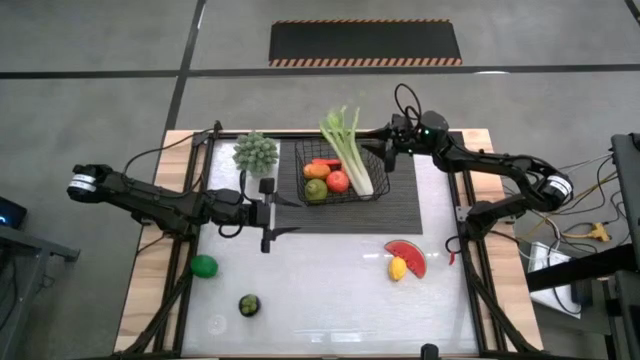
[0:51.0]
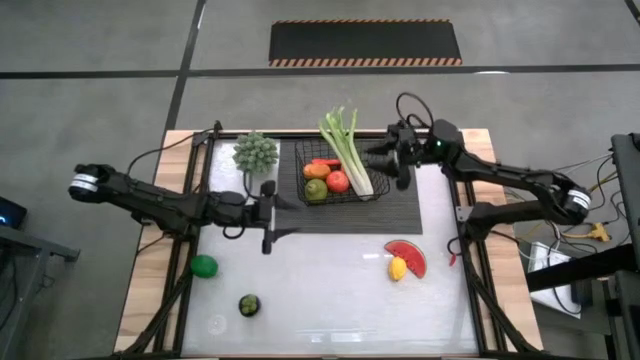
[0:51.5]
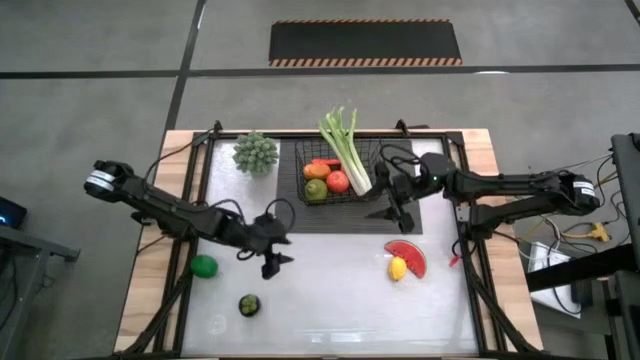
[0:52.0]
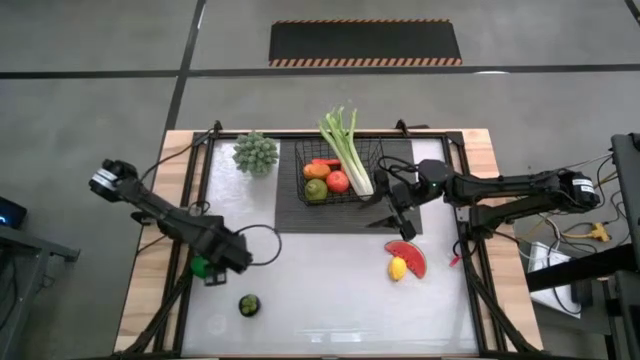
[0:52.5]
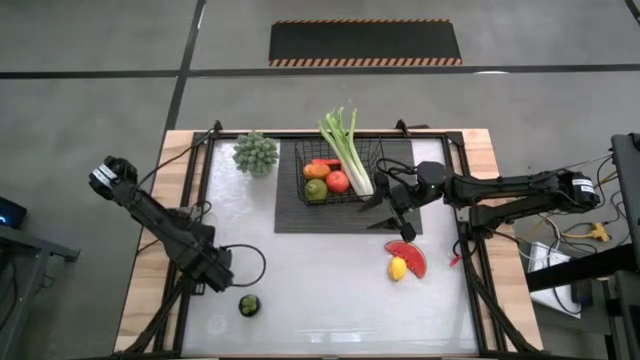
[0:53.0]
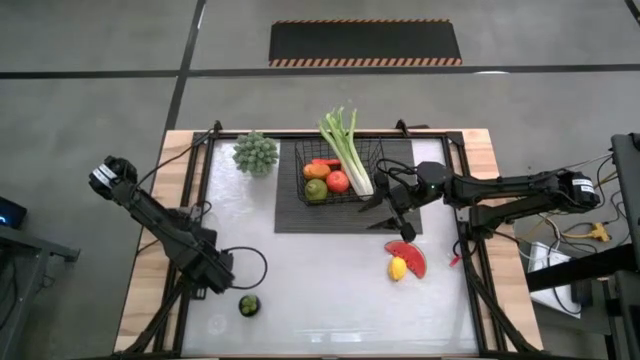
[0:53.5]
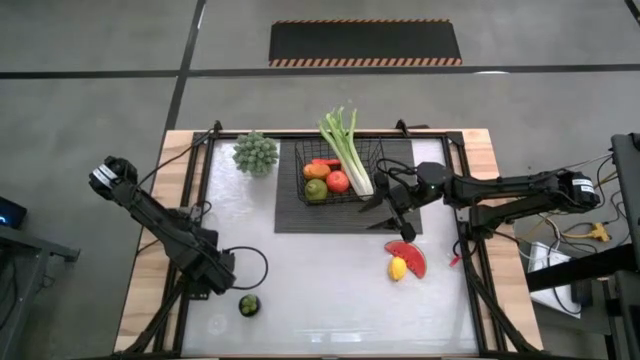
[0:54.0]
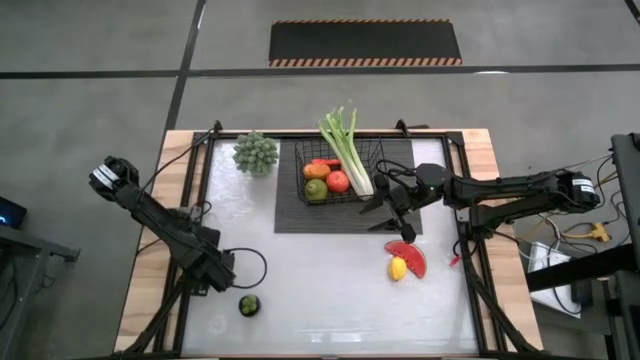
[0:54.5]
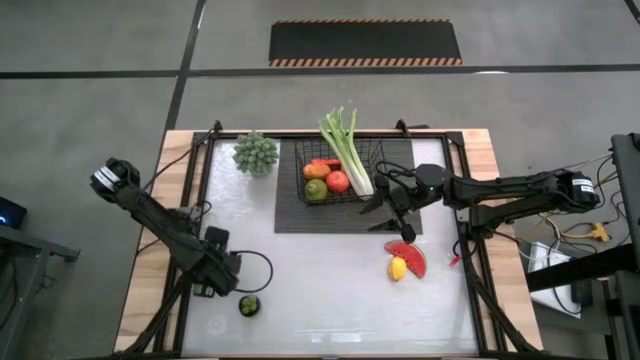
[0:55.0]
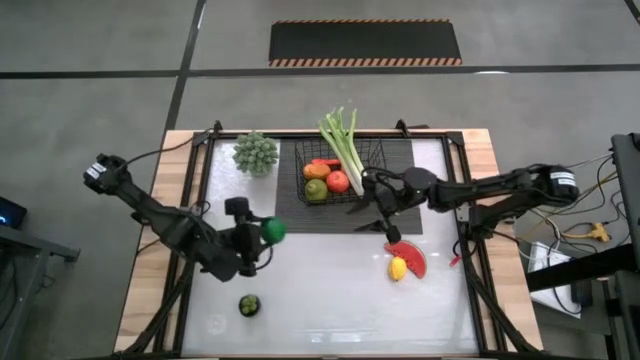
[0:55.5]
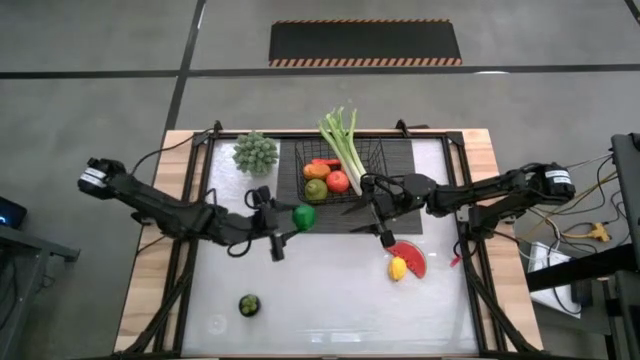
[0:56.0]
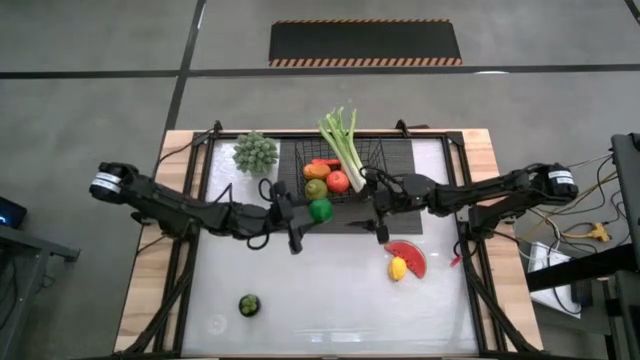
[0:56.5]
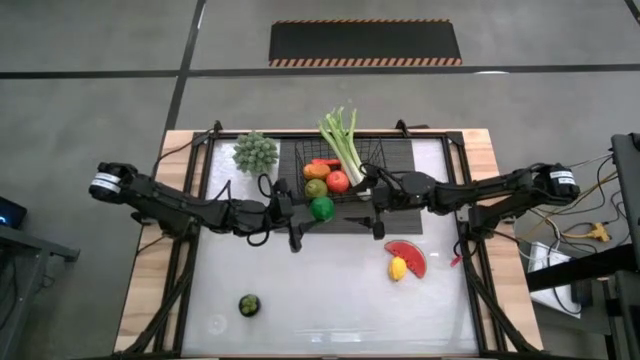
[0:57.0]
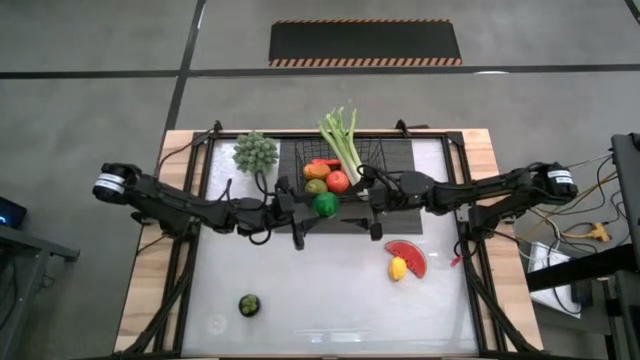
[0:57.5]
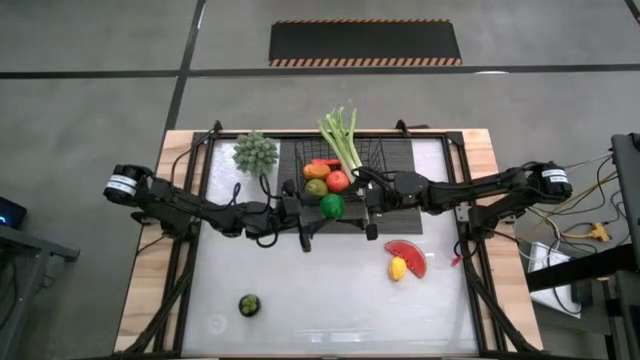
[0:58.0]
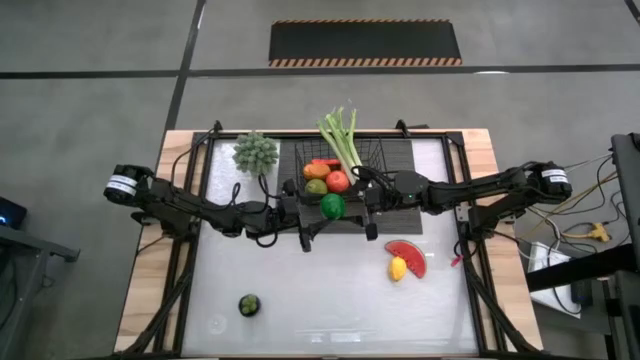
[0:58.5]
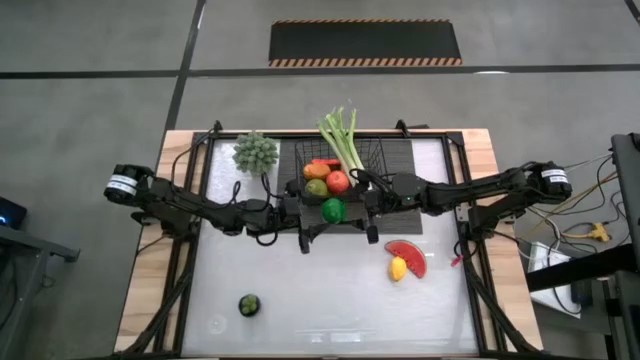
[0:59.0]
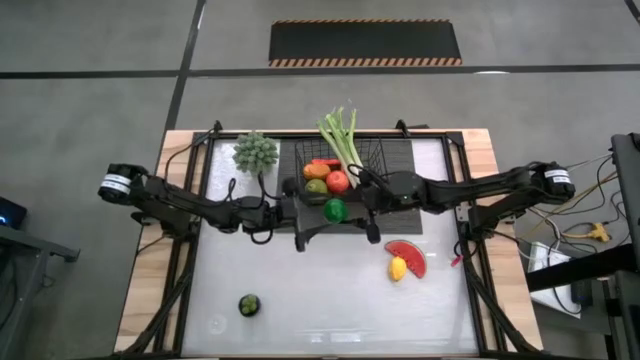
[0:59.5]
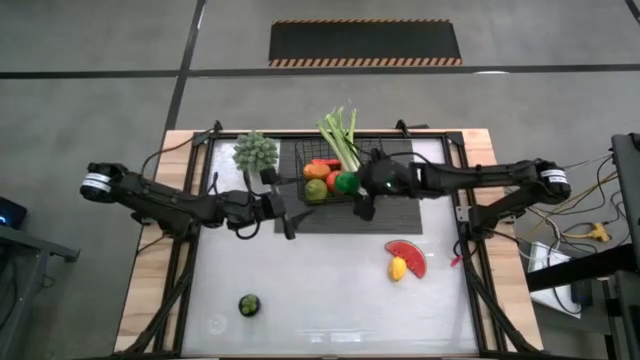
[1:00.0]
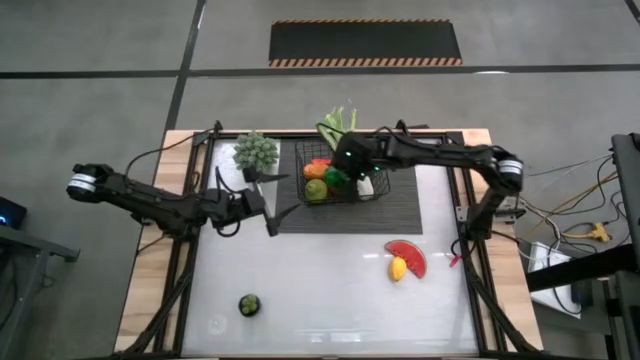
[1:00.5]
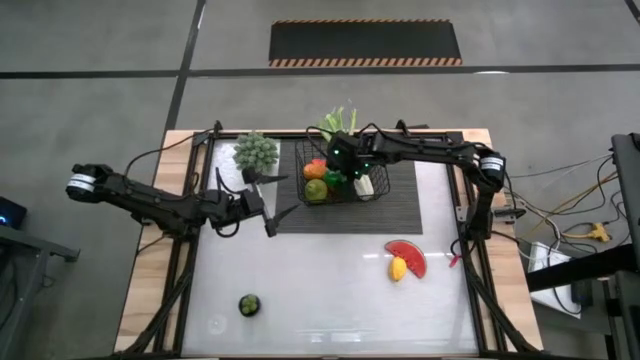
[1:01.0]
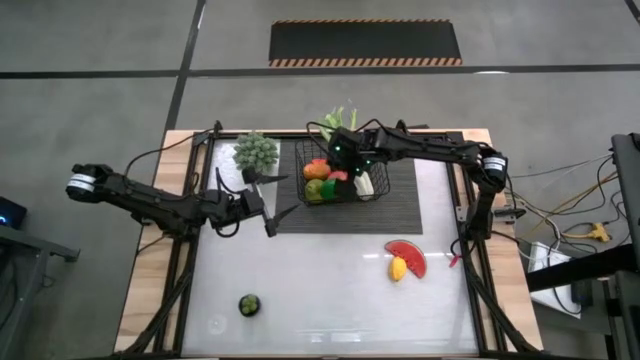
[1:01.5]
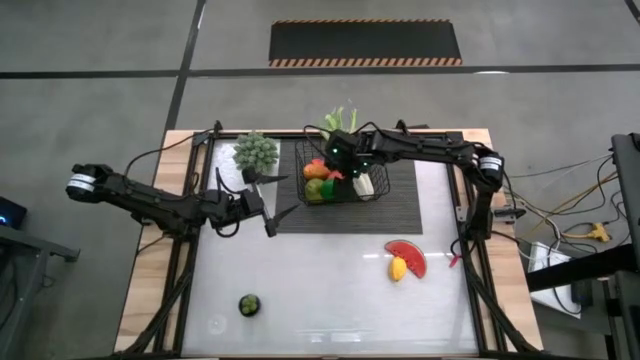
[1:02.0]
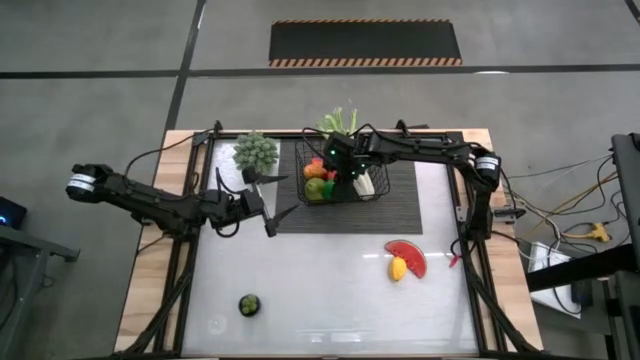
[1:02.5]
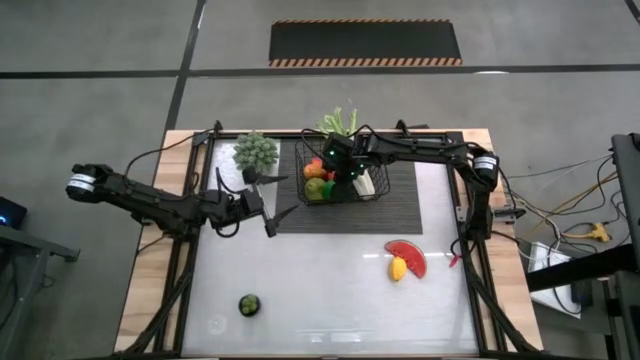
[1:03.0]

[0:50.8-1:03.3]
Task: Build produce basket
Put the green lime into the black wire basket

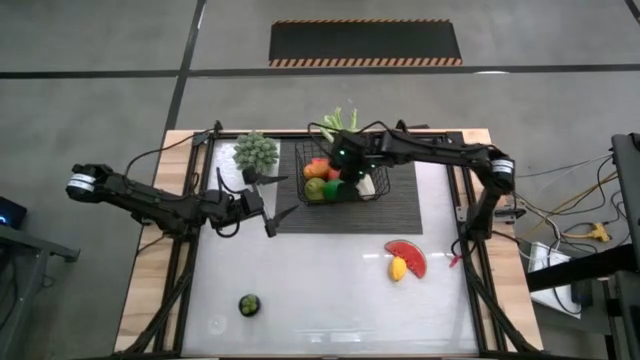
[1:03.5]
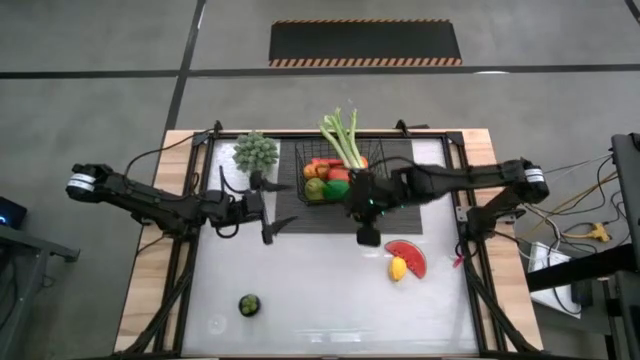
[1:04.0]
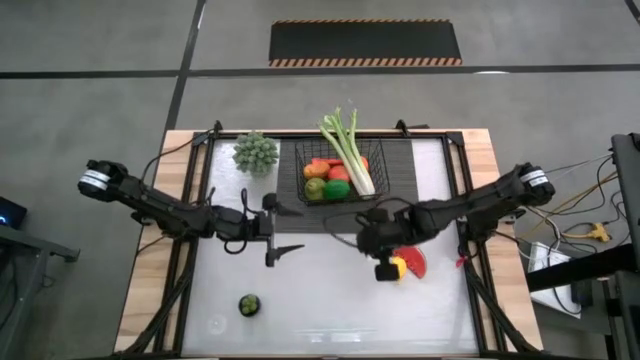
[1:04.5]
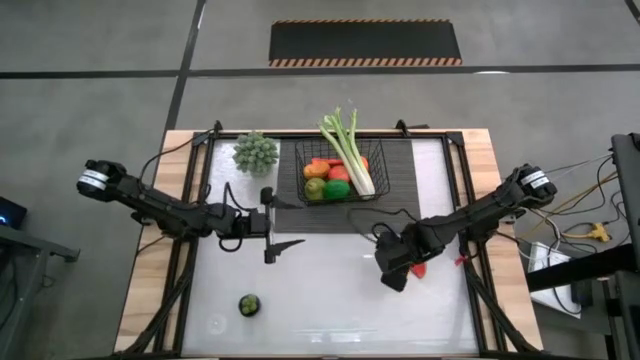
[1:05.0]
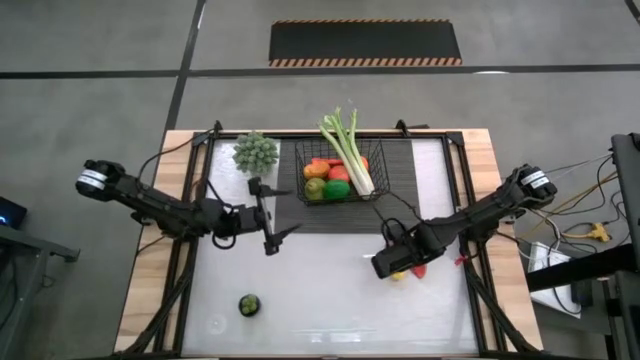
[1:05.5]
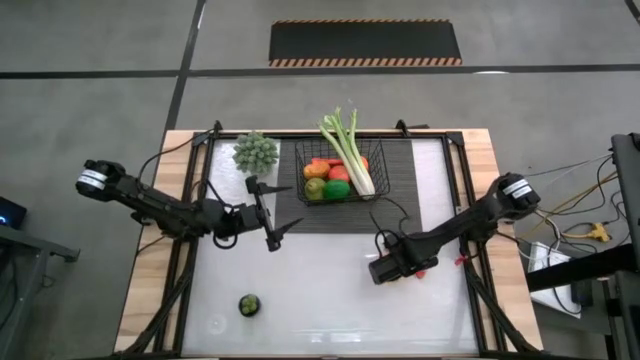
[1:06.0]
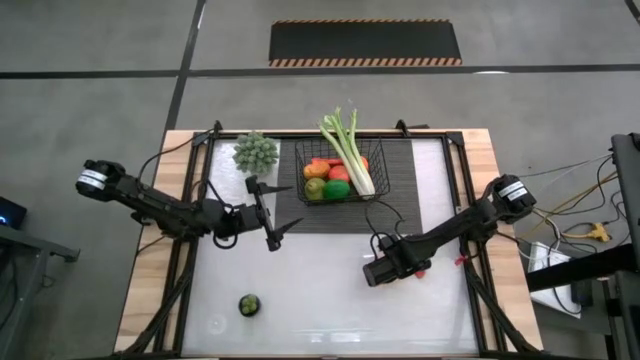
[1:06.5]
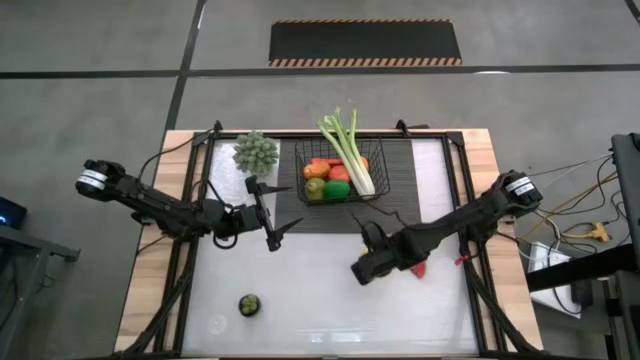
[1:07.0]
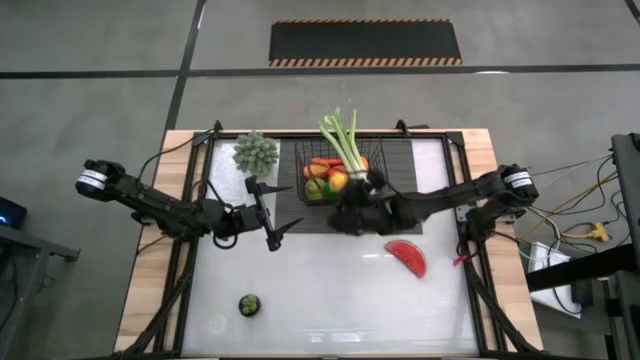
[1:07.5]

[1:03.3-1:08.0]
Put the yellow lemon into the black wire basket

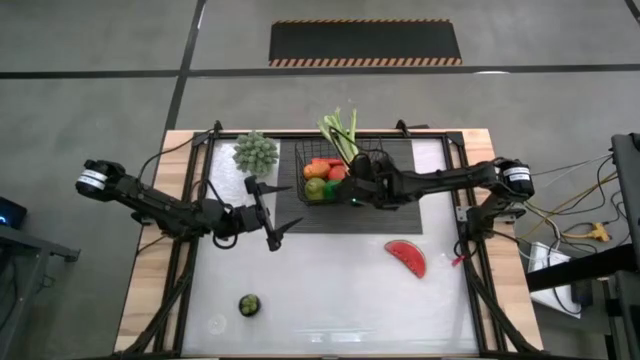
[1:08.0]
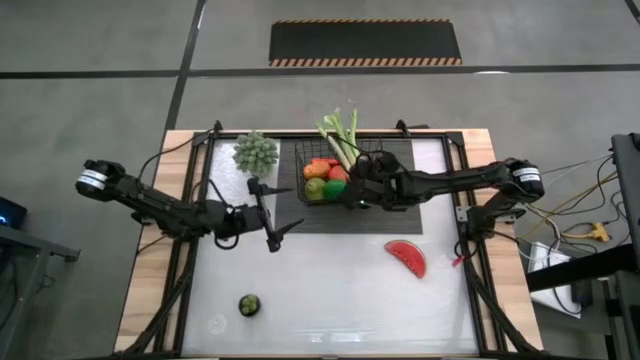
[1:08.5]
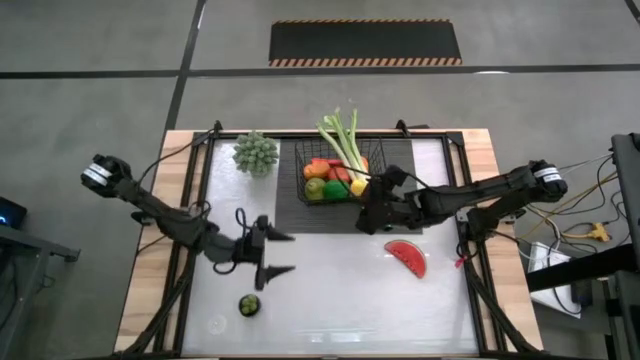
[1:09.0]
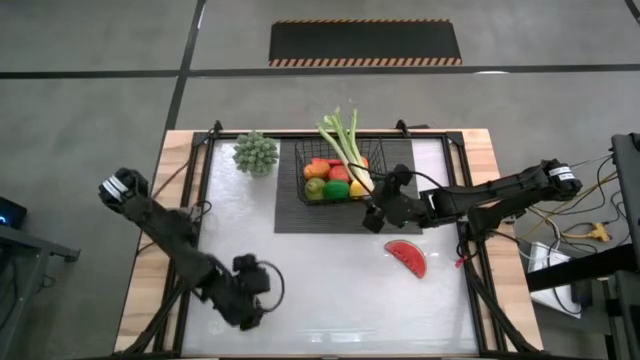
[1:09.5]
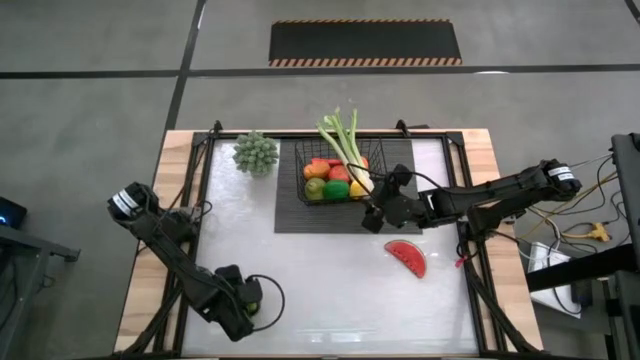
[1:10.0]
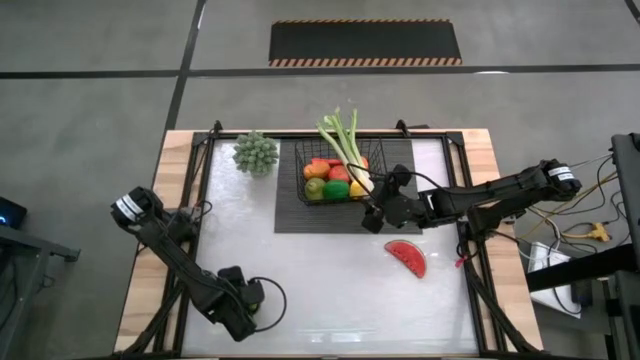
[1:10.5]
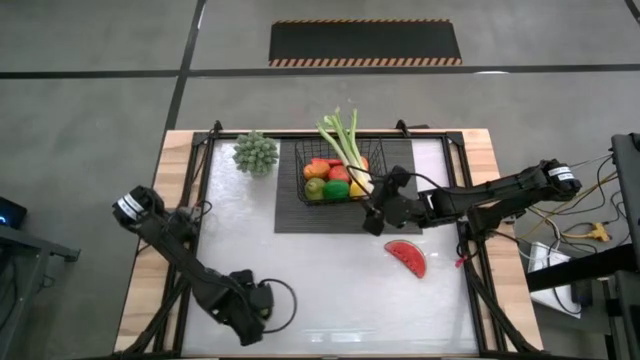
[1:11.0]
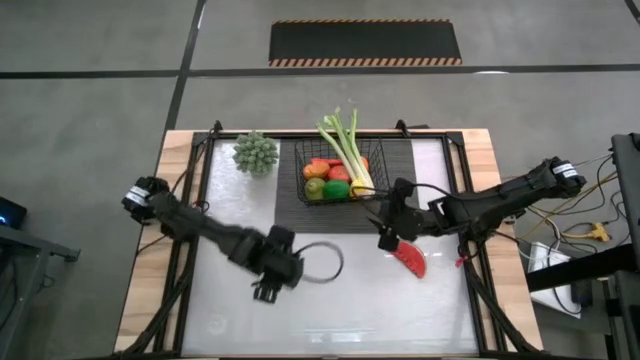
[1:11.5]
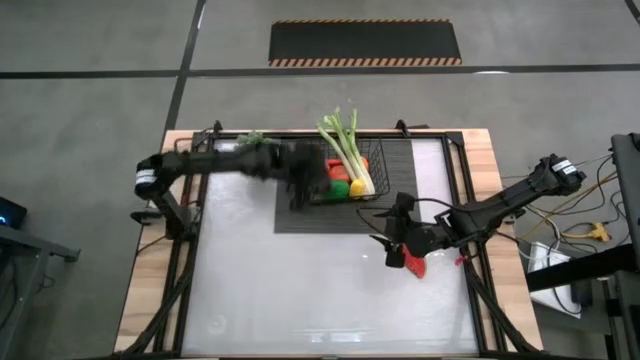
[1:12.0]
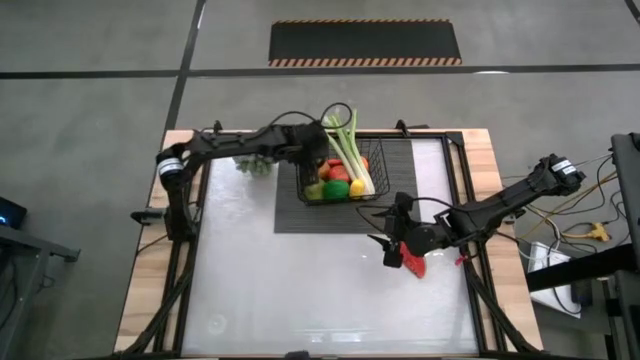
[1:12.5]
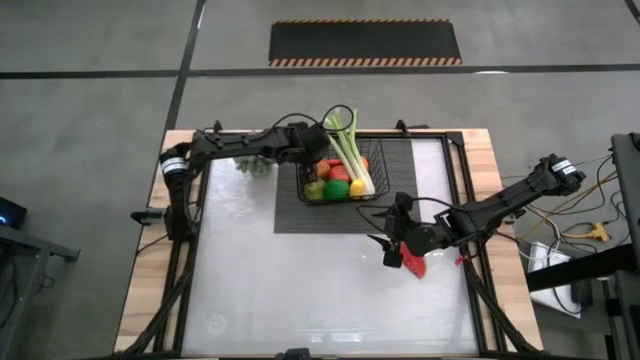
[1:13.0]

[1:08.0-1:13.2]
Put the black mangosteen into the black wire basket
